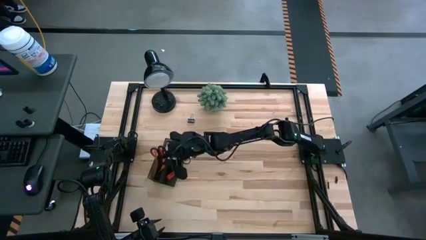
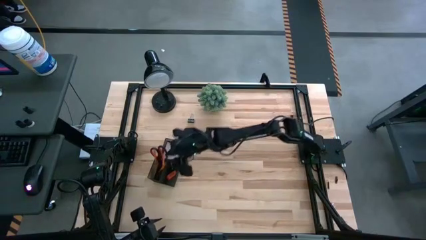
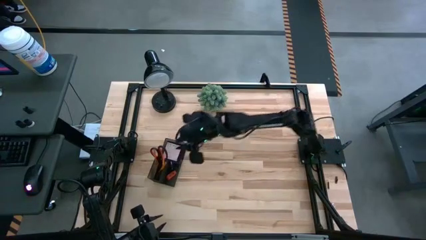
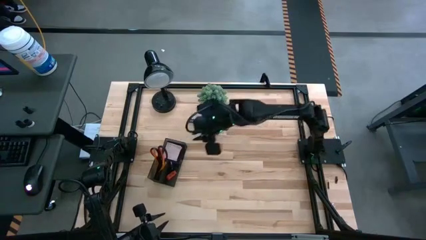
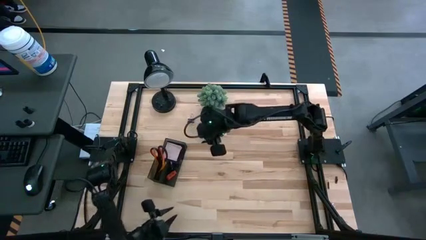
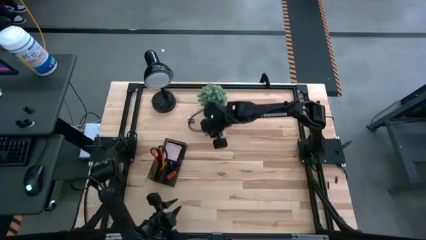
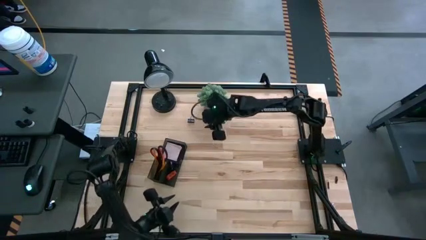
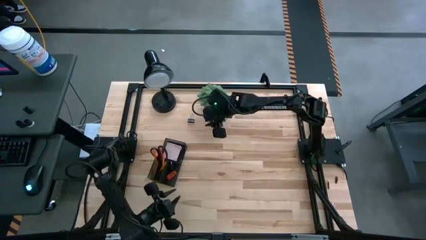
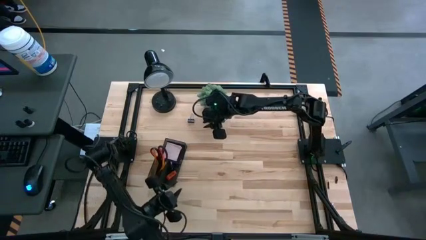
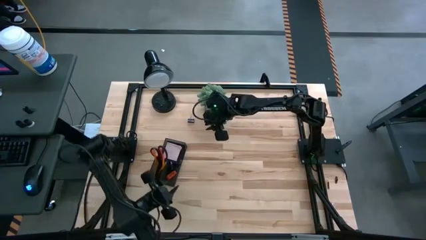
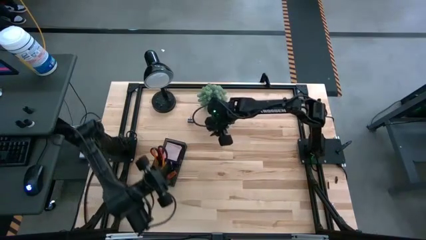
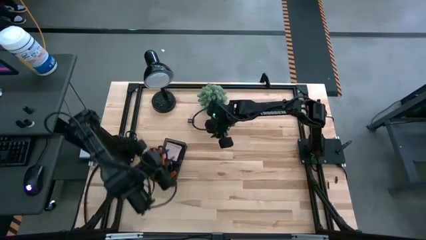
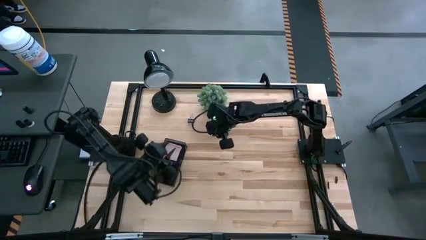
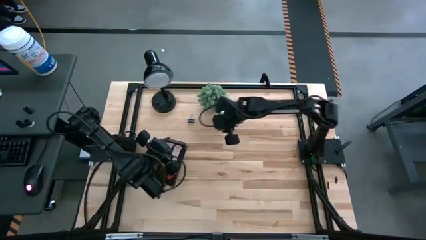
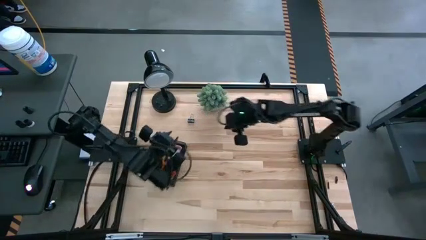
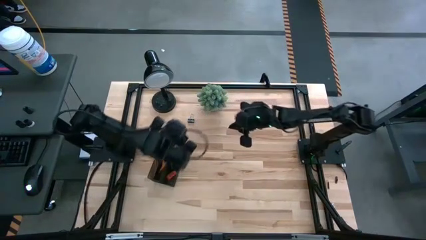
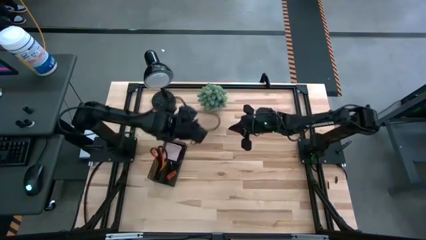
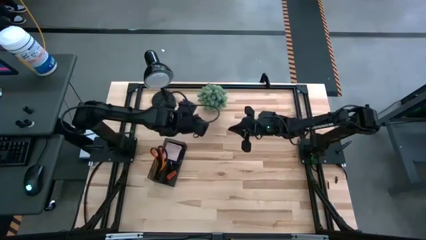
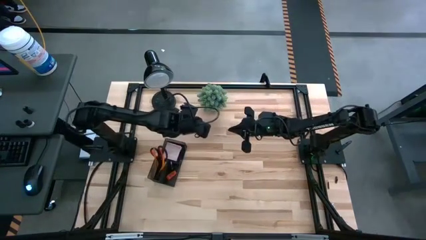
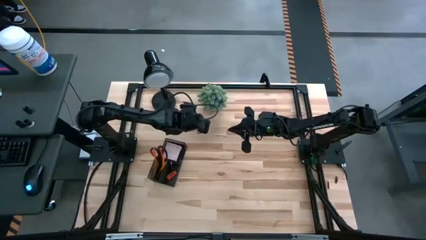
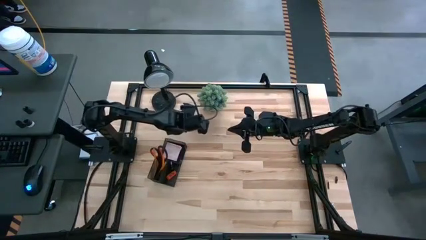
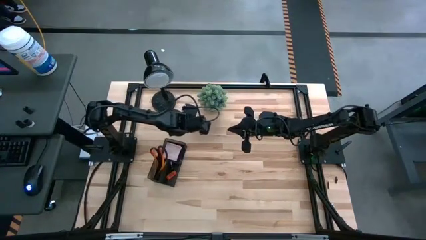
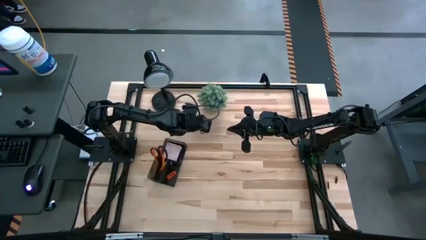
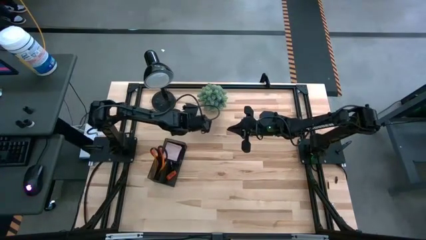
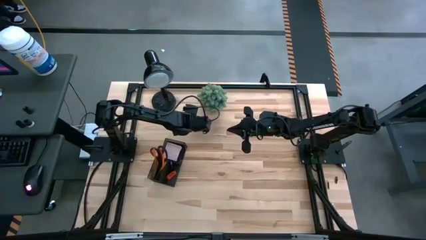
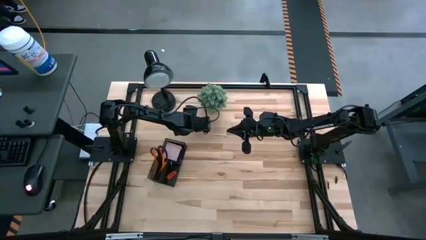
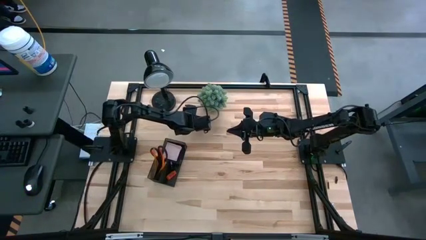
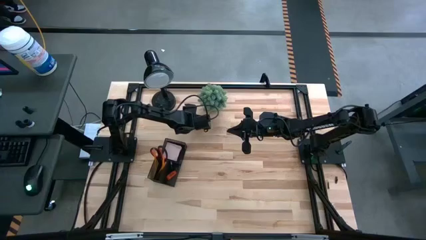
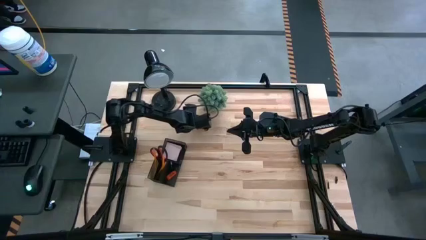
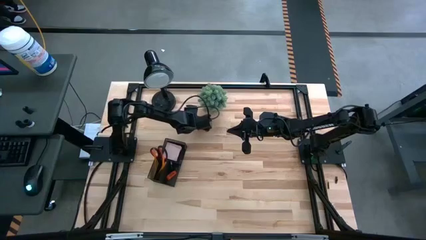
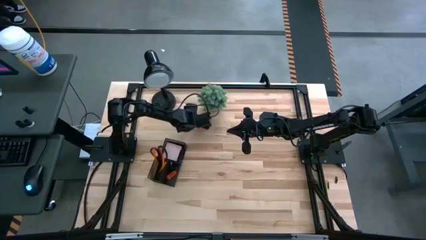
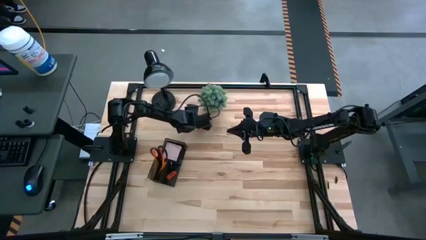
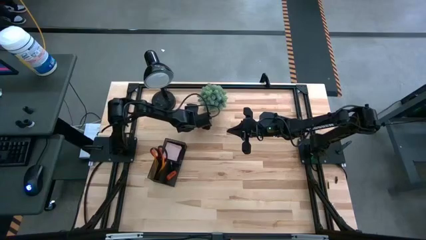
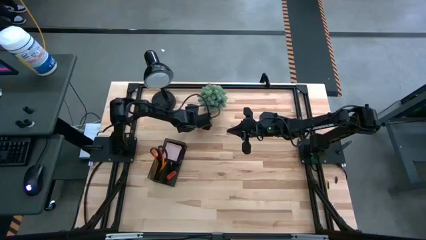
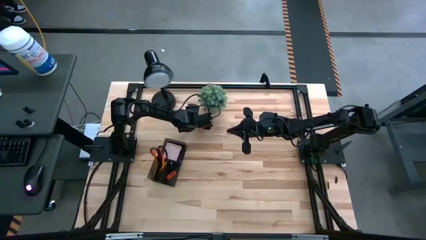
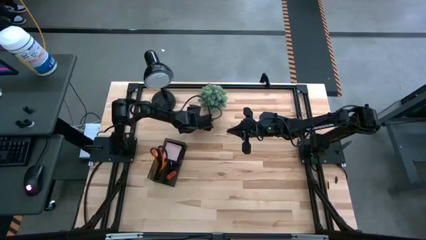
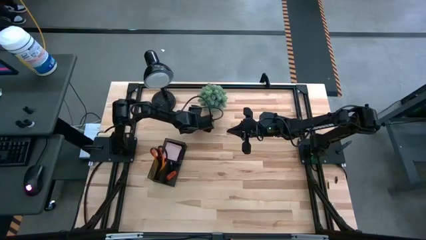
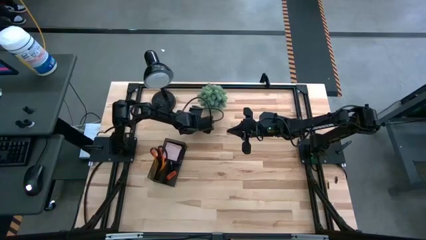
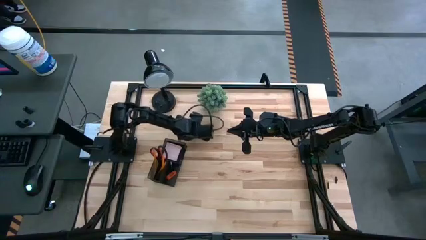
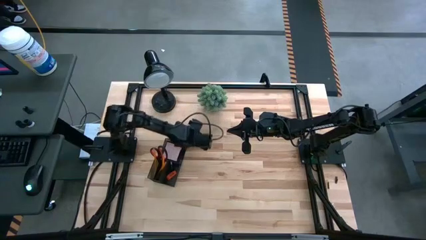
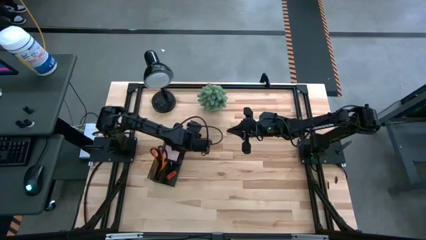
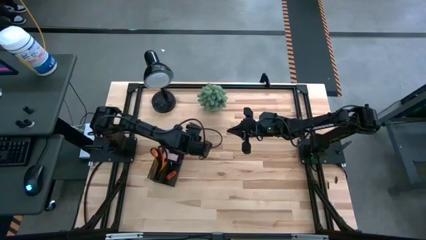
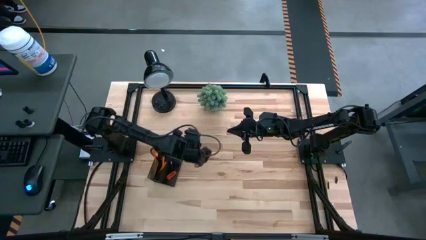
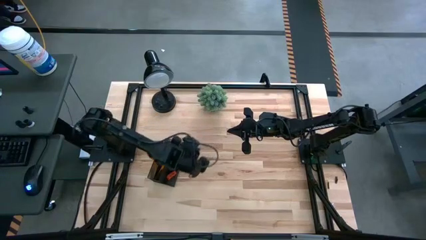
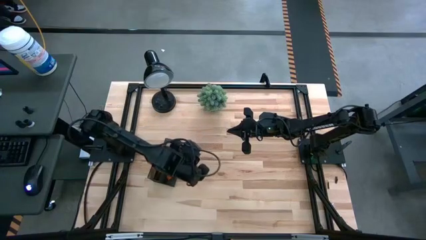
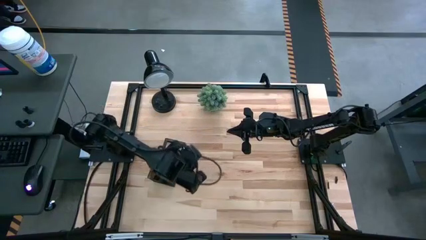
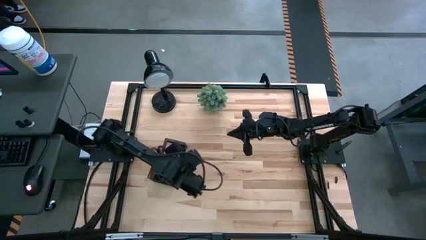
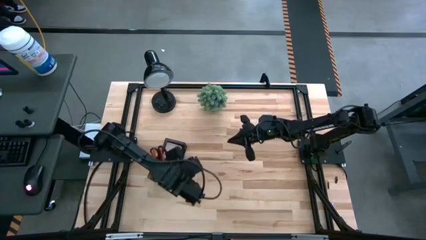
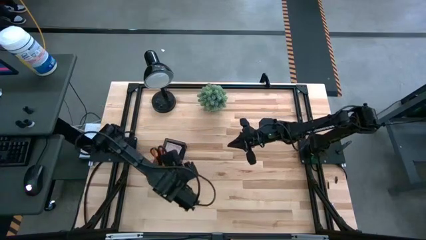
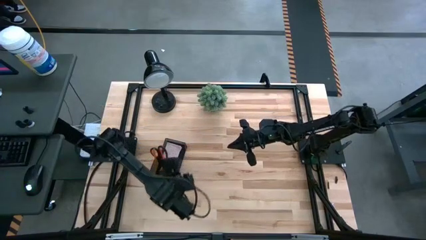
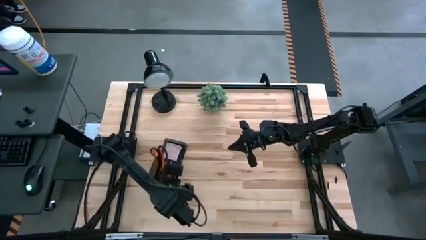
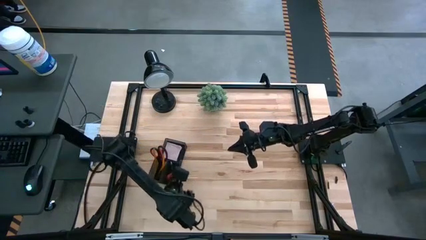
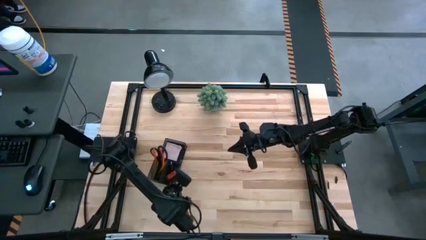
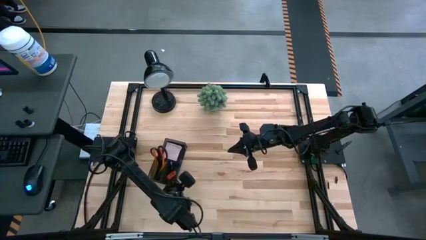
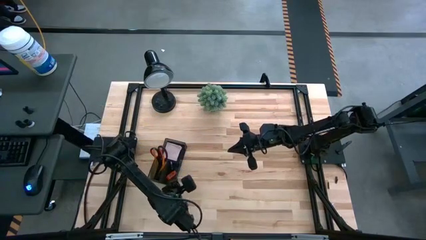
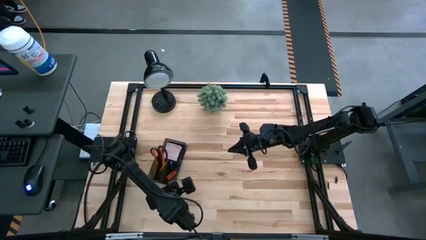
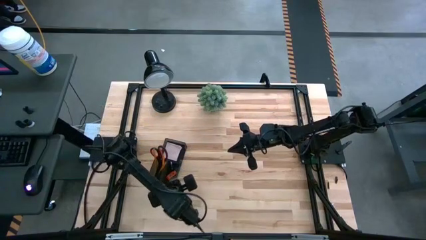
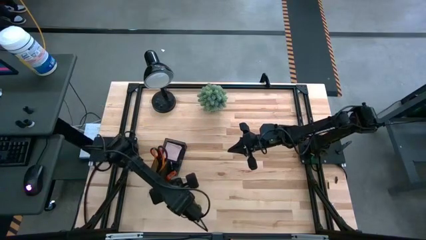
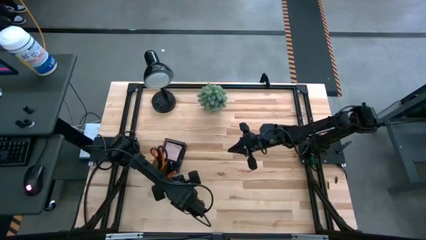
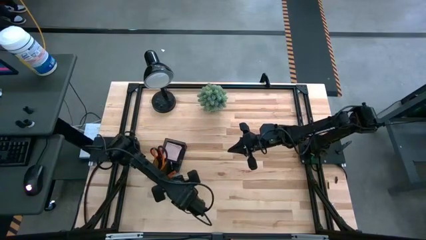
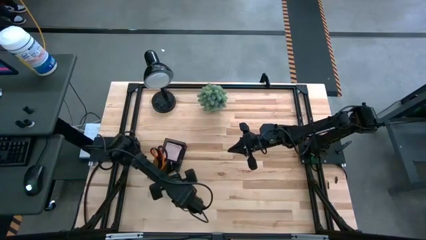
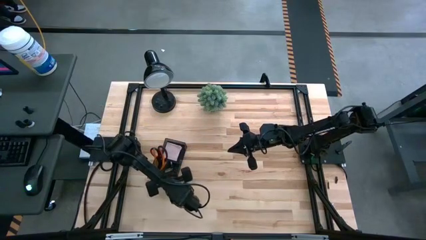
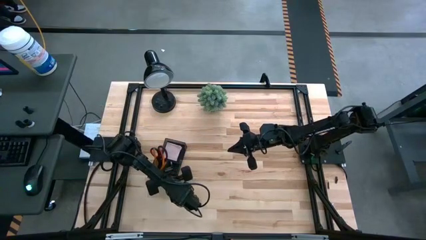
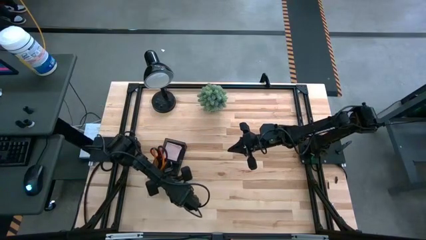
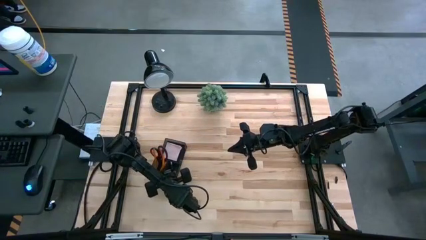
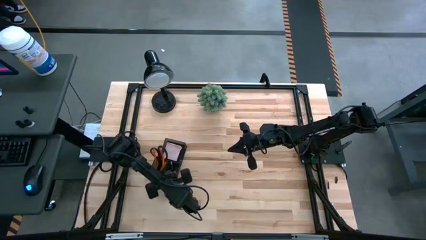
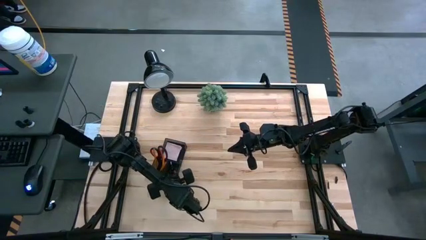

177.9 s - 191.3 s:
Task: Pick and place office supplies into organizer
Put the black binder clip into the desk organizer
